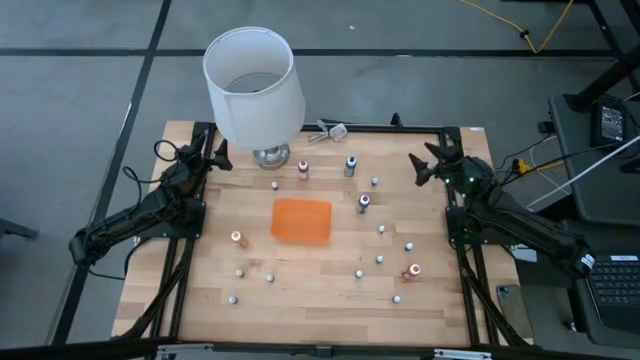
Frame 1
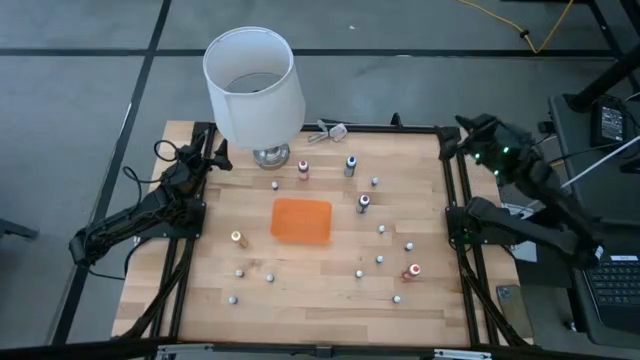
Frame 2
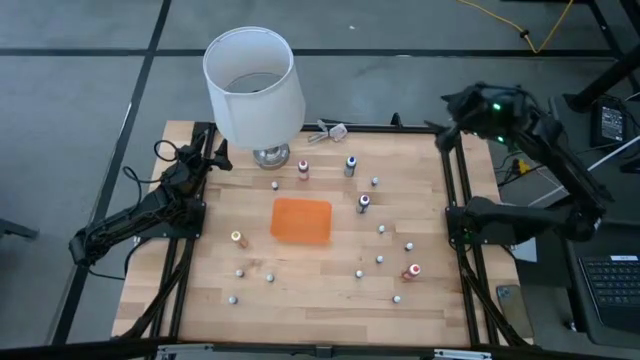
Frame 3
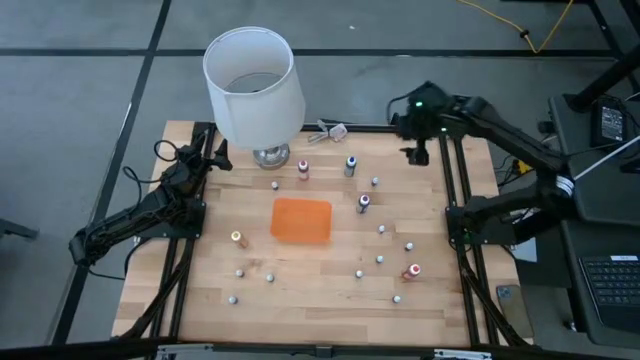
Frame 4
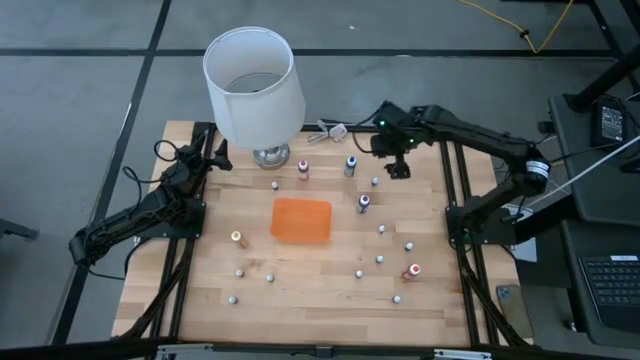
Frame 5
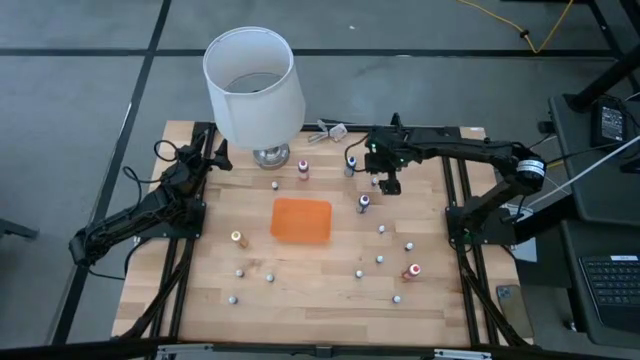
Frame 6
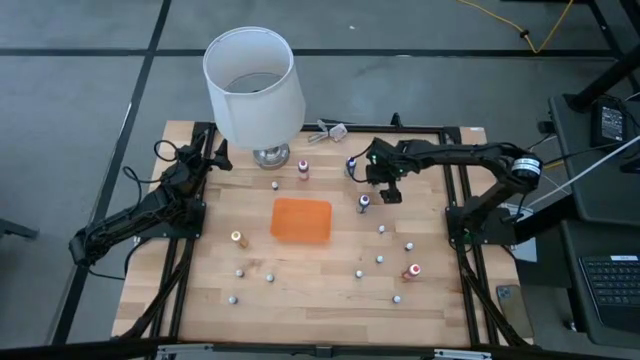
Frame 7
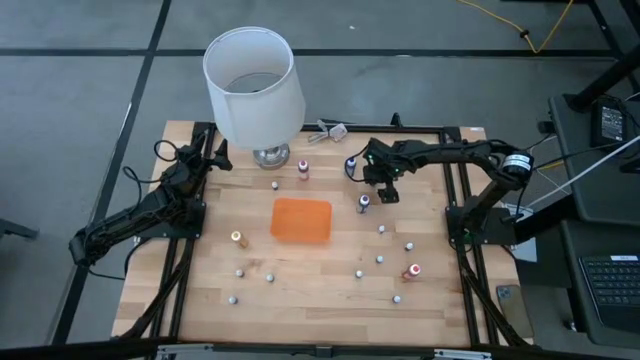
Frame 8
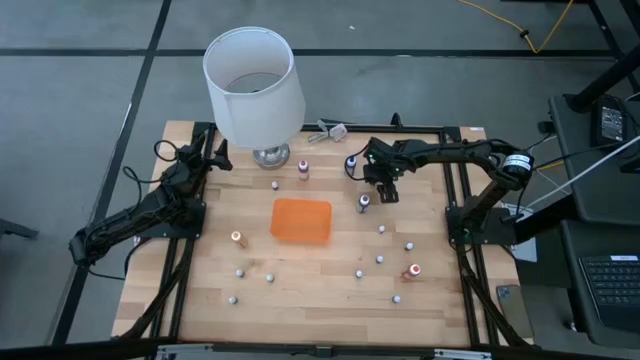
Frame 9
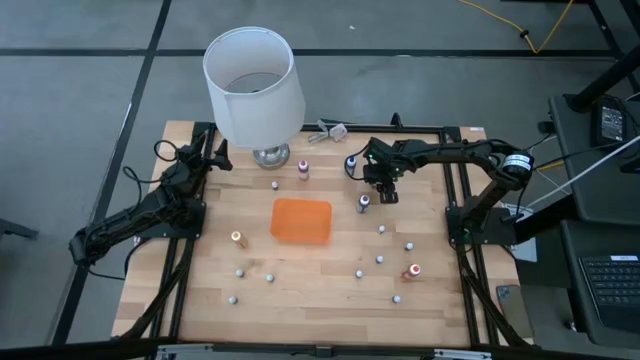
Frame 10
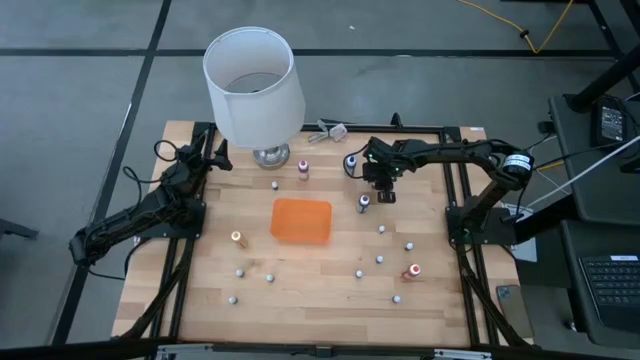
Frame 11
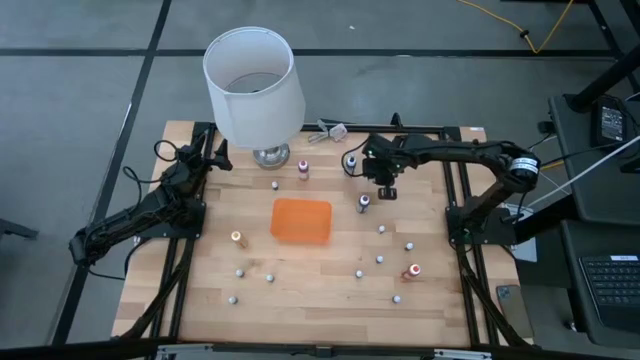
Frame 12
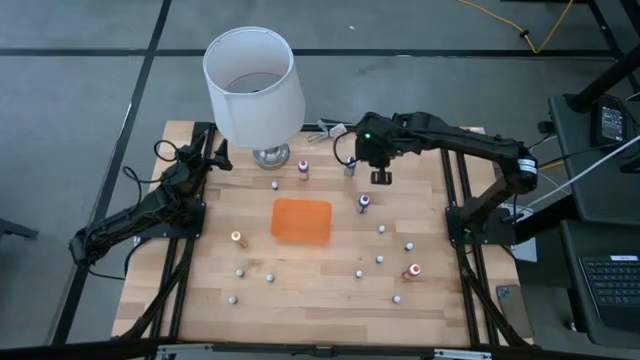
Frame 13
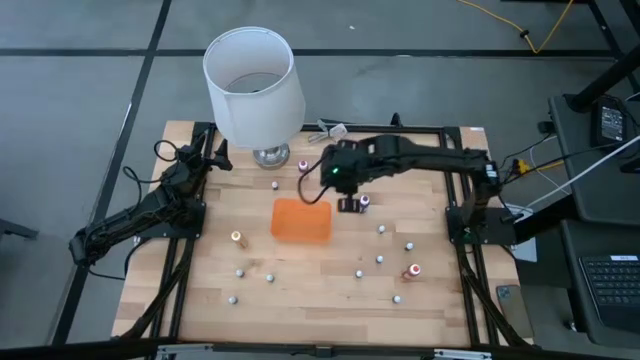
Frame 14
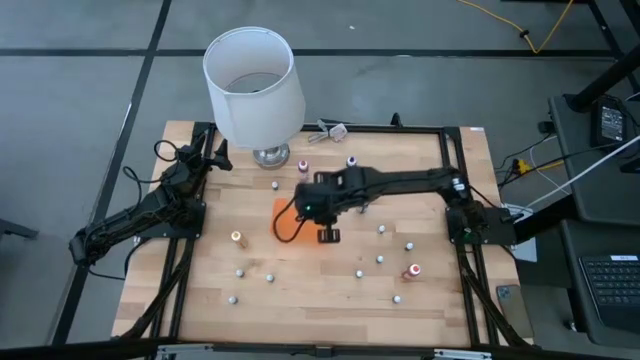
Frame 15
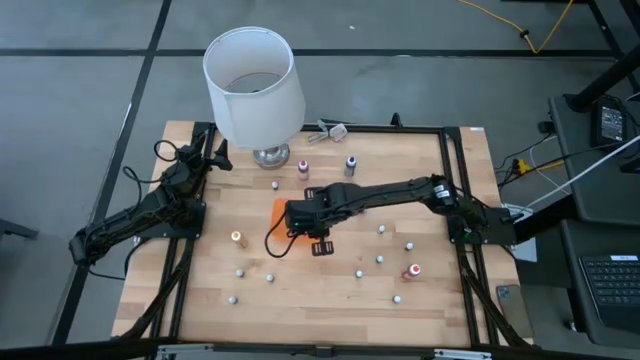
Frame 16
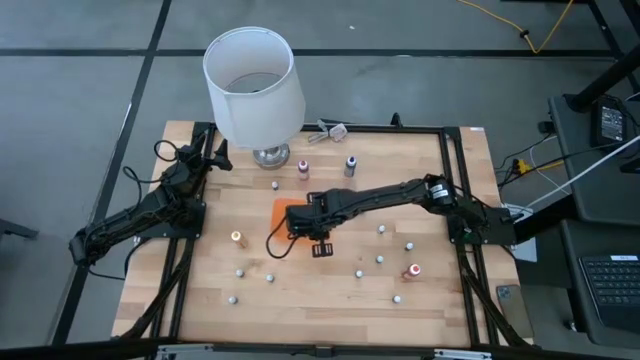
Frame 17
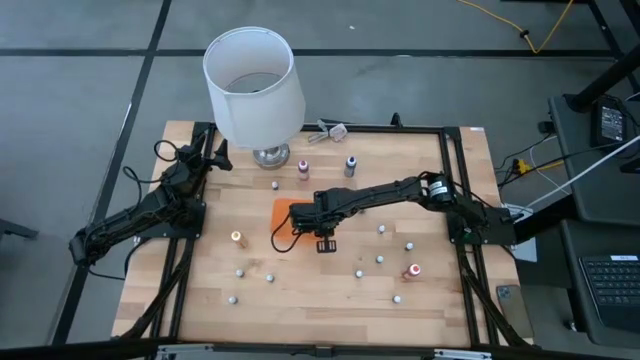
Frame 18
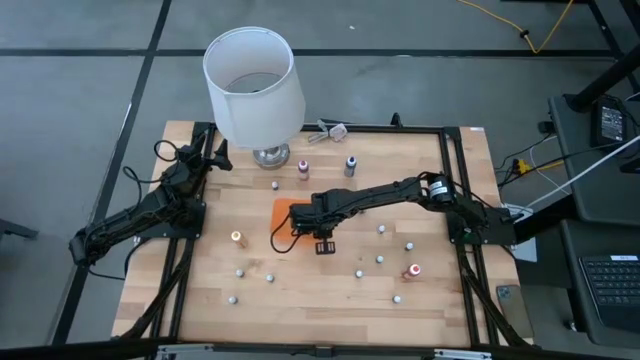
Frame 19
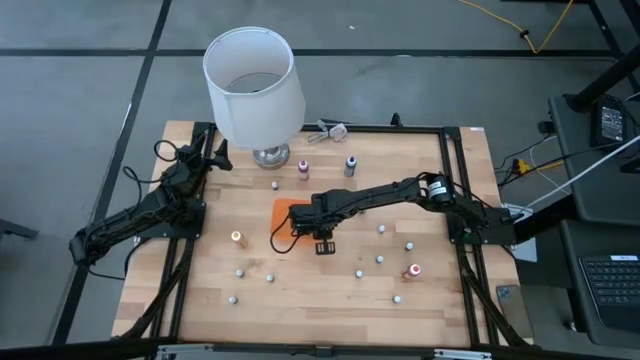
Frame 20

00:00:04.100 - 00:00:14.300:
Task: Pick & Place food coloring
Put the small purple food coloring bottle into the orange bin

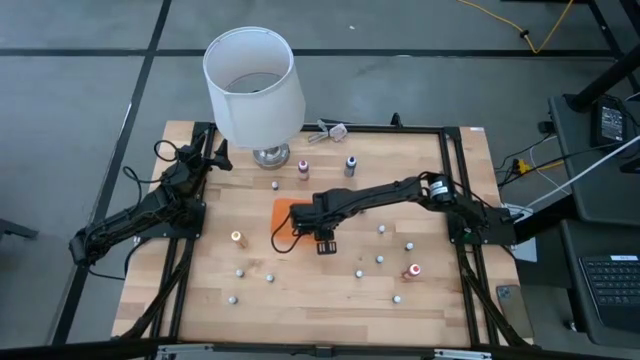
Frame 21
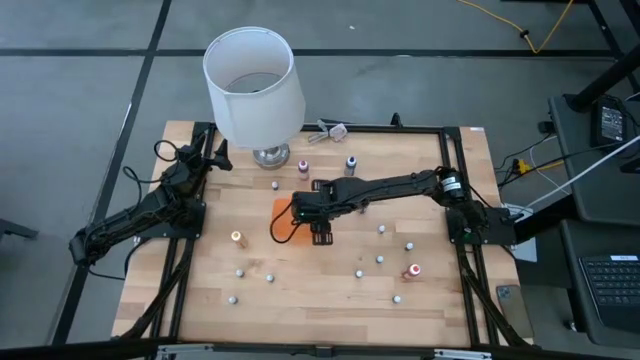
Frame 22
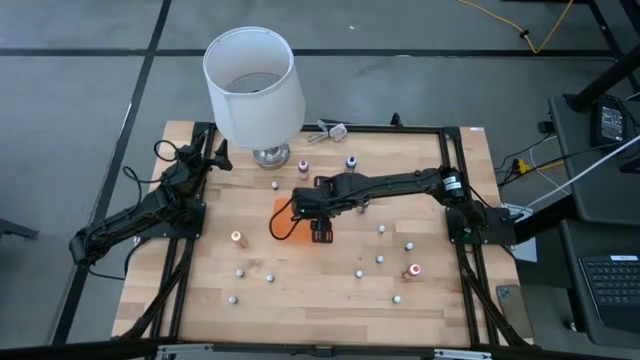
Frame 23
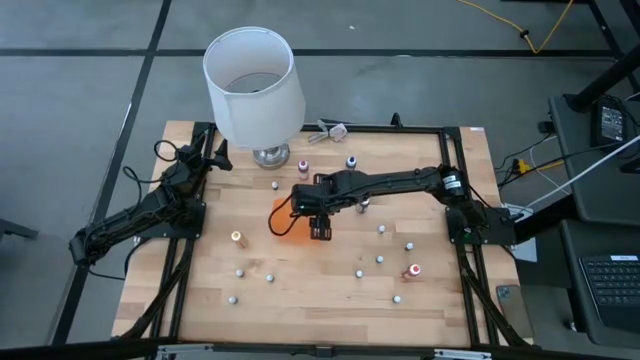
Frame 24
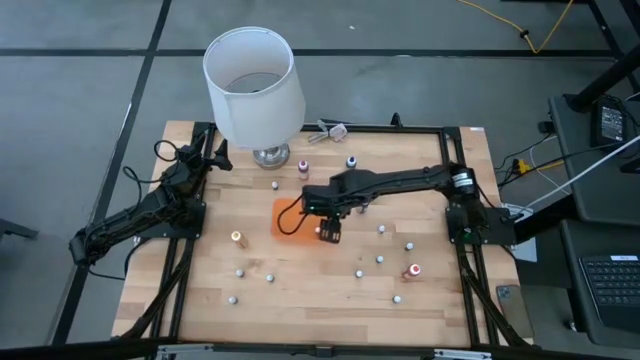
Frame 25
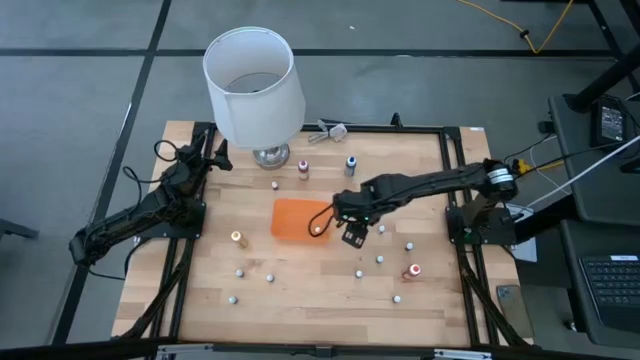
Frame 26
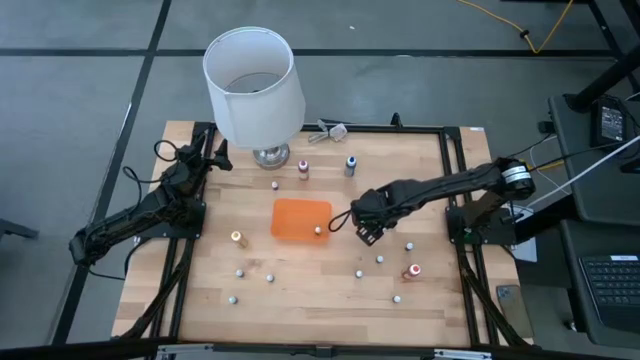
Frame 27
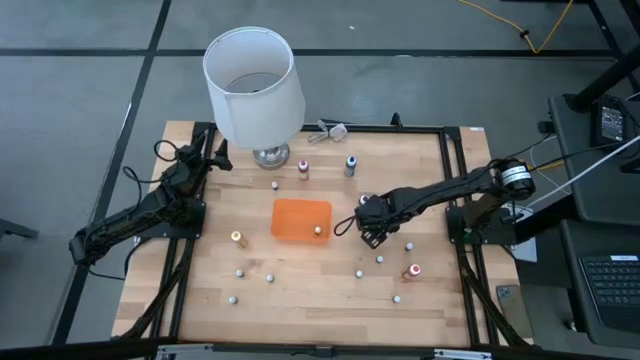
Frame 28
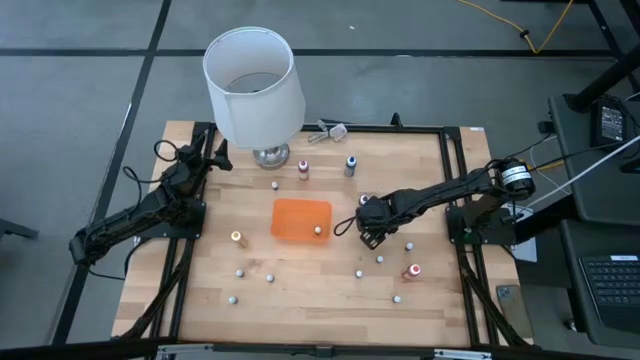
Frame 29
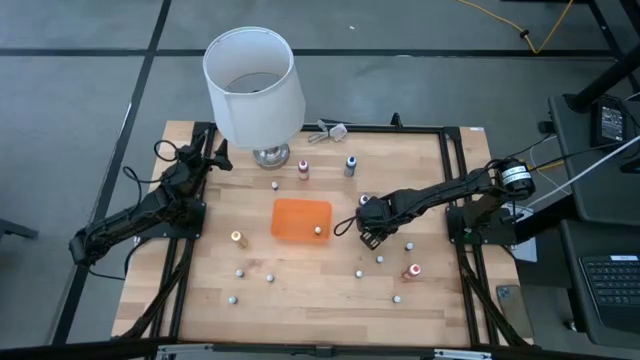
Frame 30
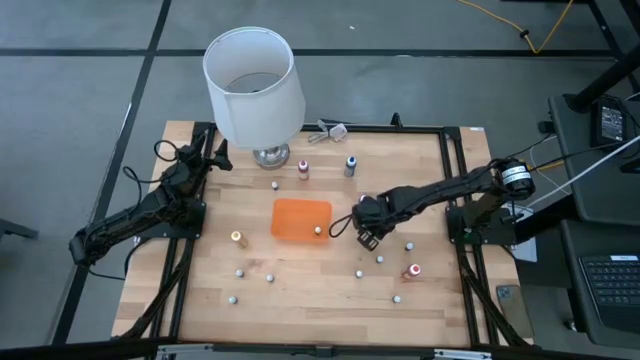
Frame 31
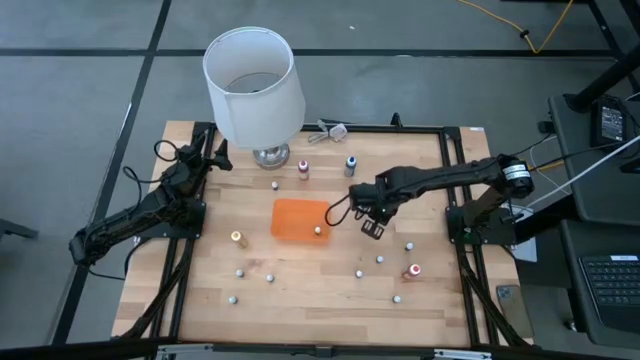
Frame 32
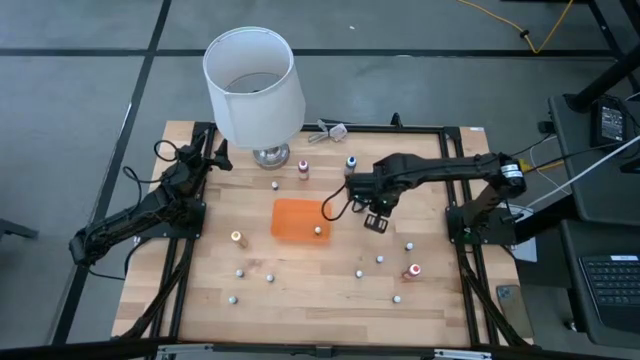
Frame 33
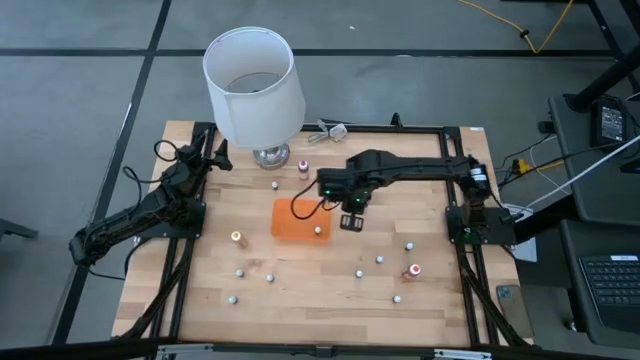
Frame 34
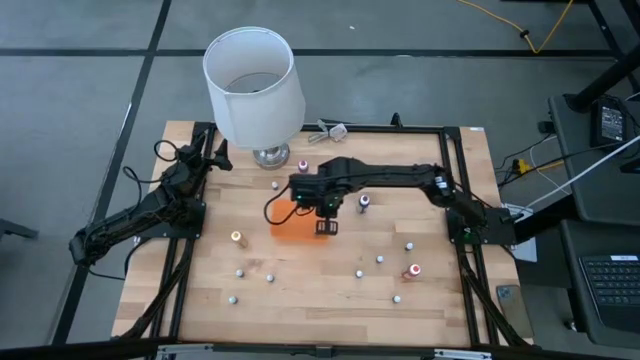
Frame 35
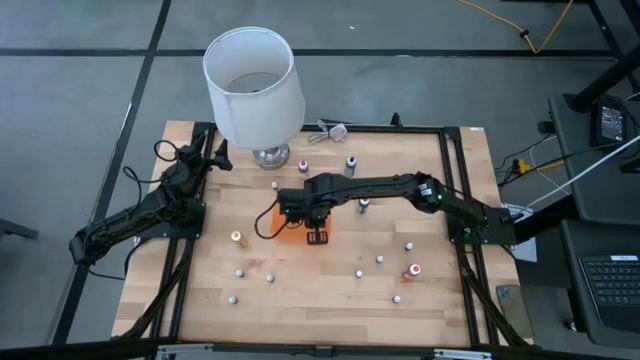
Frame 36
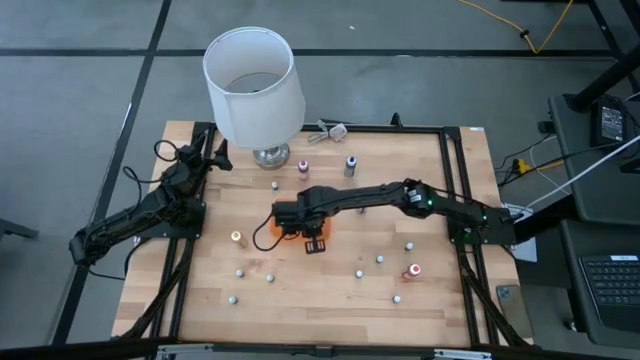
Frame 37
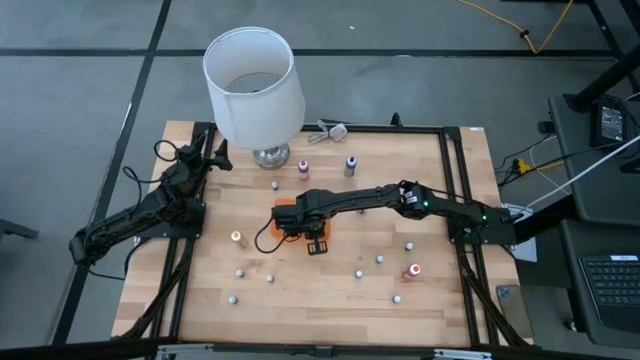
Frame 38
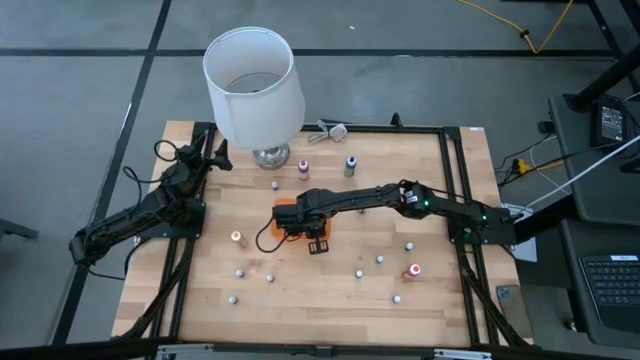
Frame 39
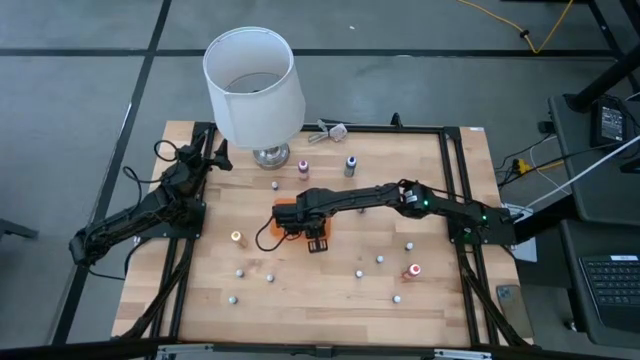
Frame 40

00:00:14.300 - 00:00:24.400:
Put the small black food coloring bottle into the orange bin

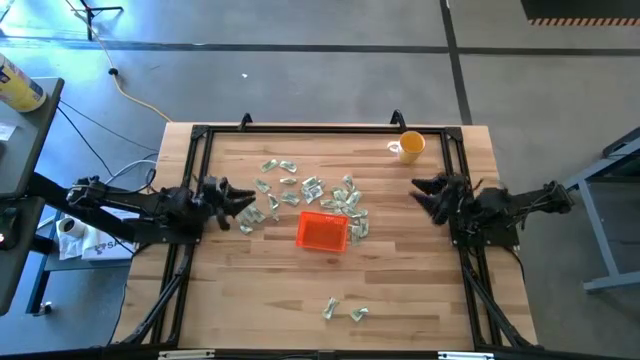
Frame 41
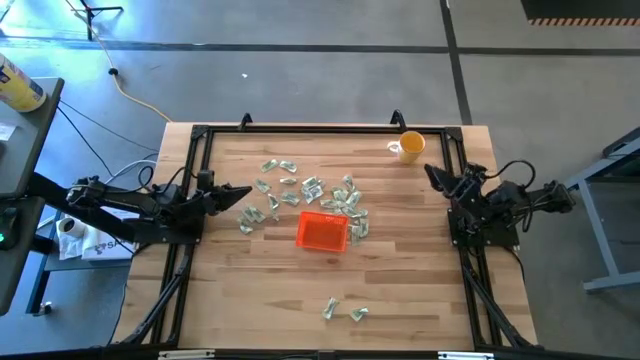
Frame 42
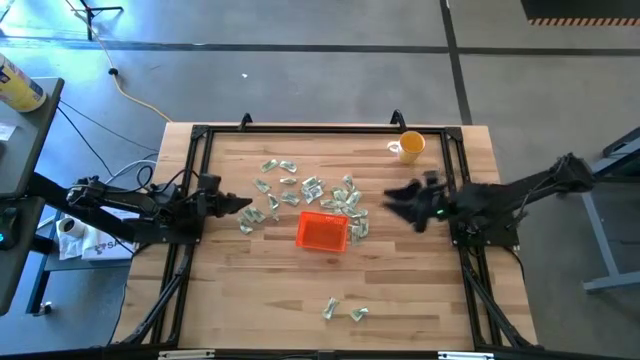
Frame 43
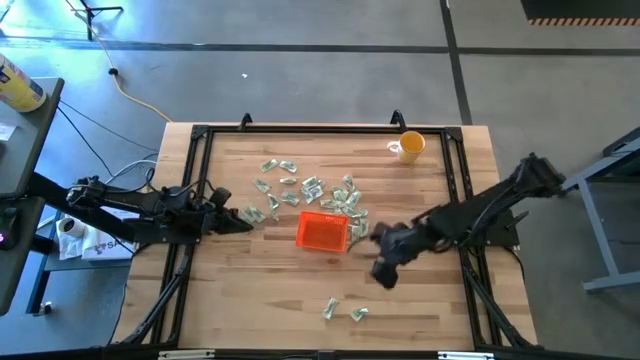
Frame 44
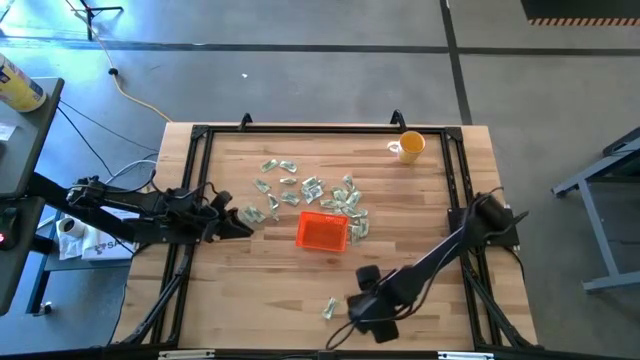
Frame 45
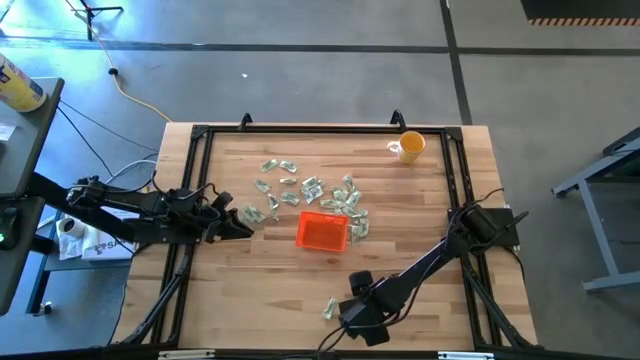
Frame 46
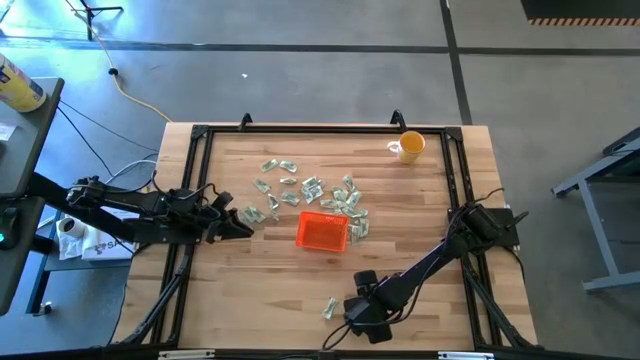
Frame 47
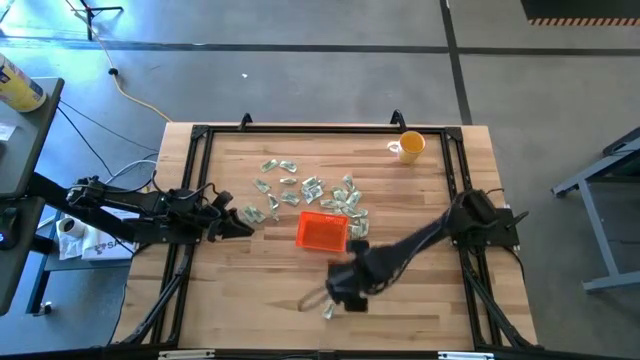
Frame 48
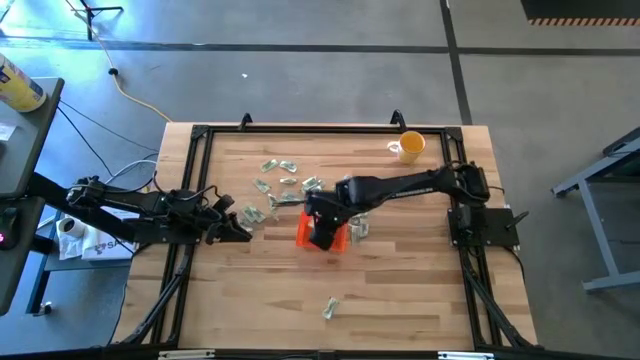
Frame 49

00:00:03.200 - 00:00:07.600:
Task: Pick and place Stevia / Truvia into bins
Put the stevia packet into the orange bin
